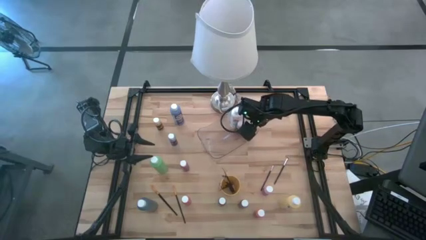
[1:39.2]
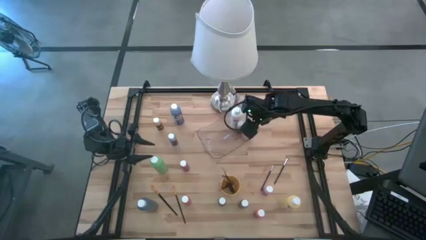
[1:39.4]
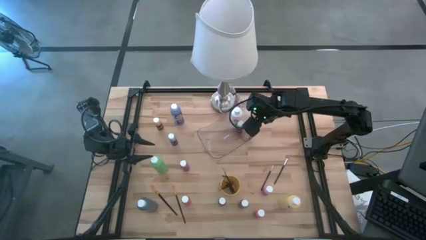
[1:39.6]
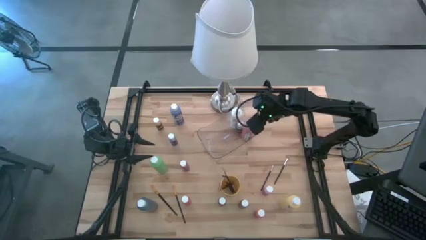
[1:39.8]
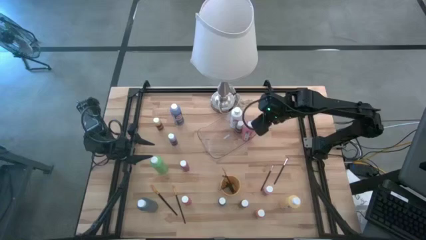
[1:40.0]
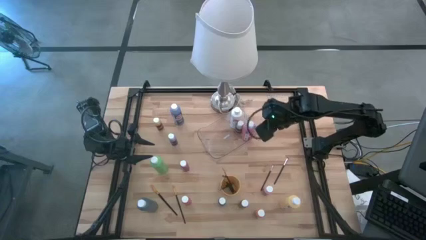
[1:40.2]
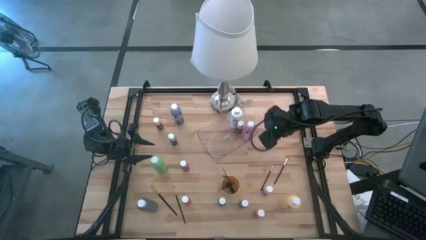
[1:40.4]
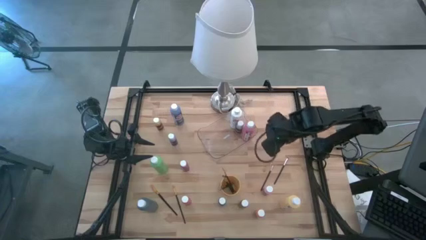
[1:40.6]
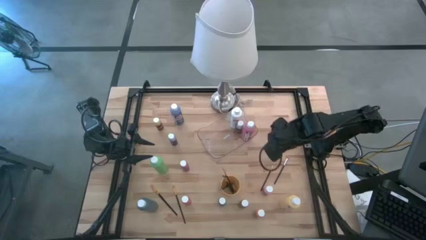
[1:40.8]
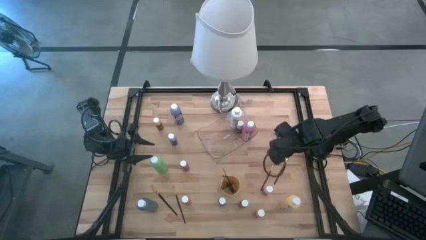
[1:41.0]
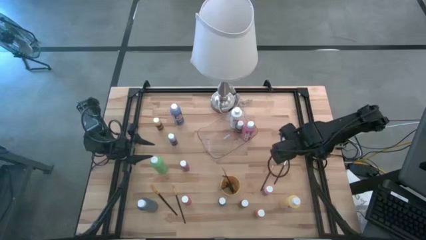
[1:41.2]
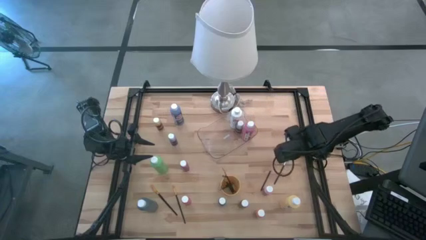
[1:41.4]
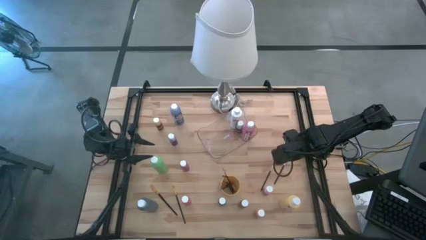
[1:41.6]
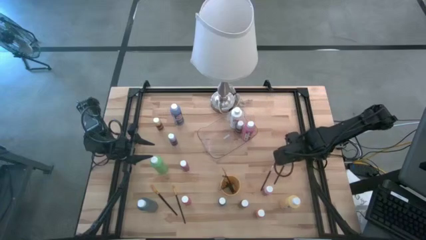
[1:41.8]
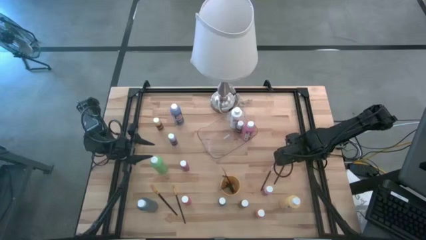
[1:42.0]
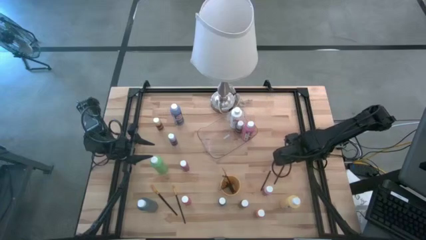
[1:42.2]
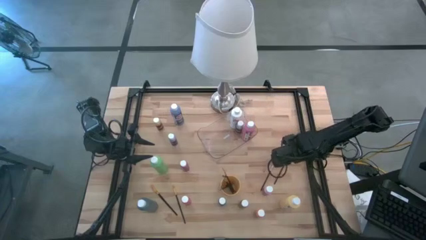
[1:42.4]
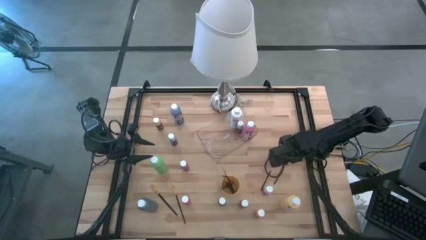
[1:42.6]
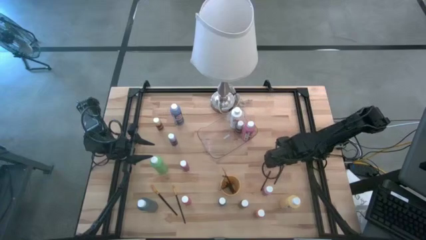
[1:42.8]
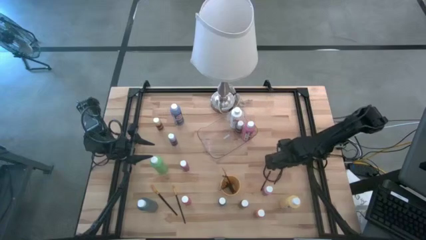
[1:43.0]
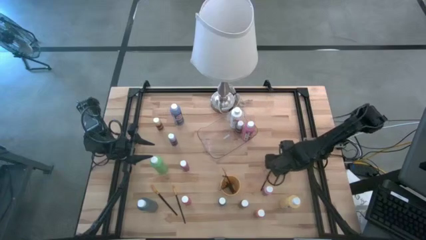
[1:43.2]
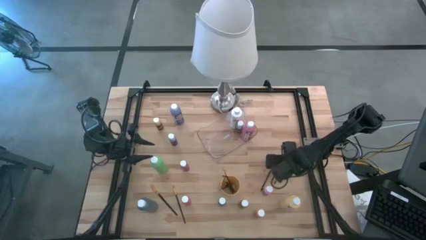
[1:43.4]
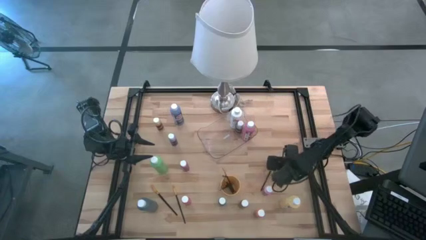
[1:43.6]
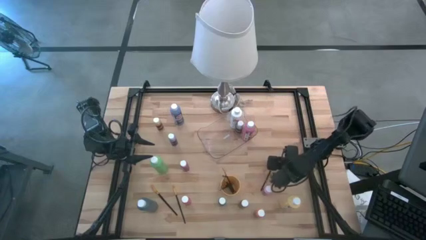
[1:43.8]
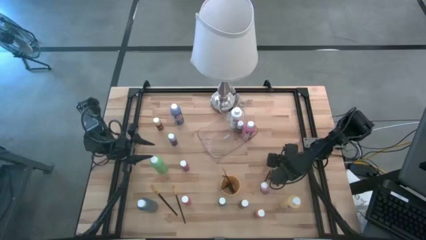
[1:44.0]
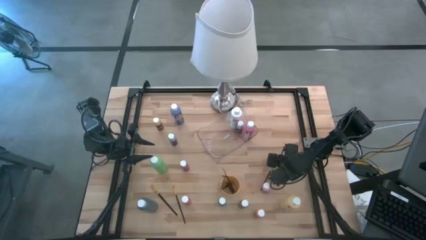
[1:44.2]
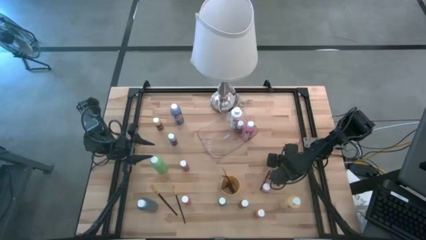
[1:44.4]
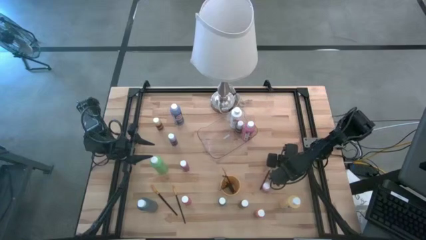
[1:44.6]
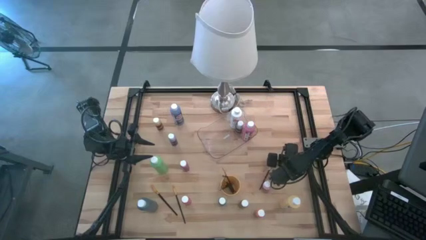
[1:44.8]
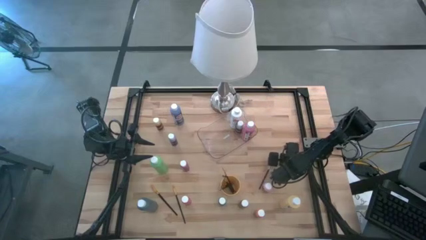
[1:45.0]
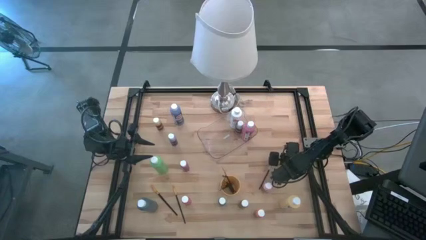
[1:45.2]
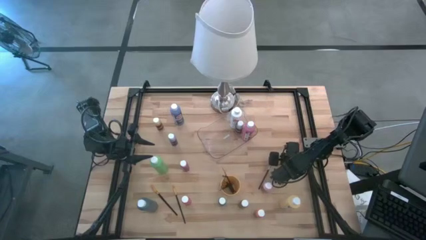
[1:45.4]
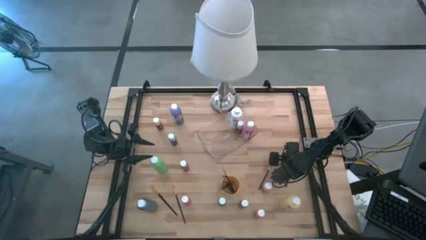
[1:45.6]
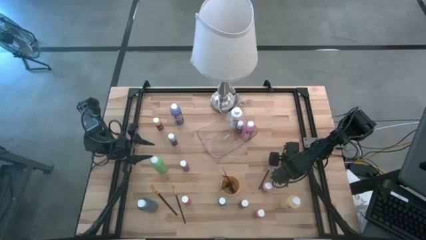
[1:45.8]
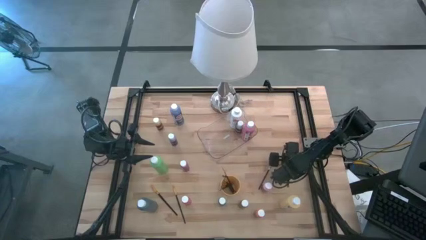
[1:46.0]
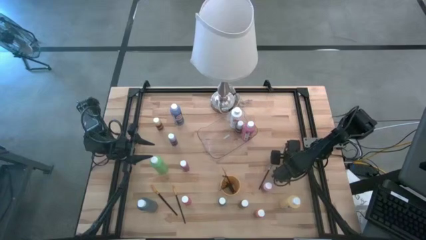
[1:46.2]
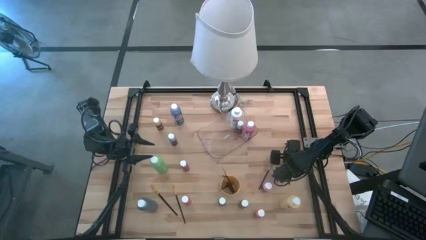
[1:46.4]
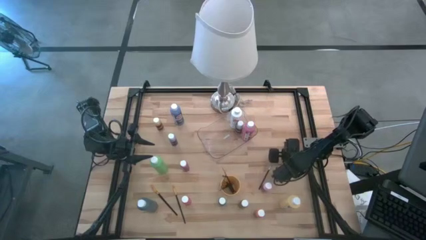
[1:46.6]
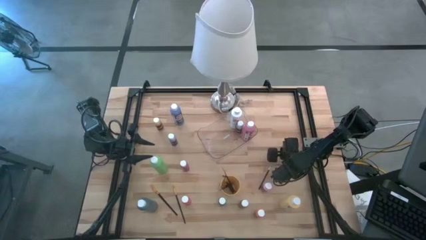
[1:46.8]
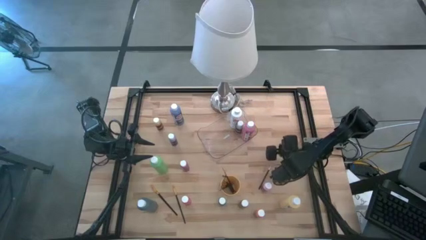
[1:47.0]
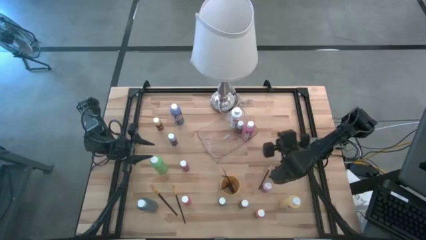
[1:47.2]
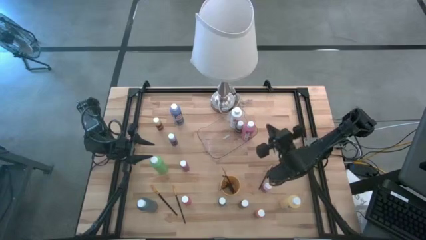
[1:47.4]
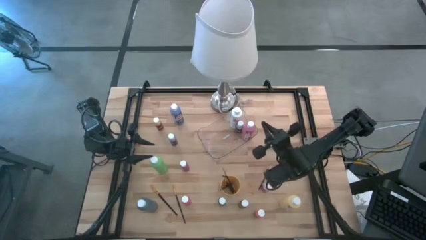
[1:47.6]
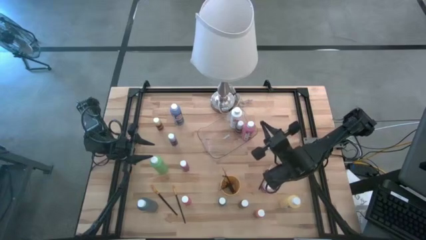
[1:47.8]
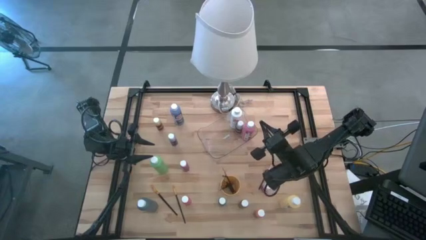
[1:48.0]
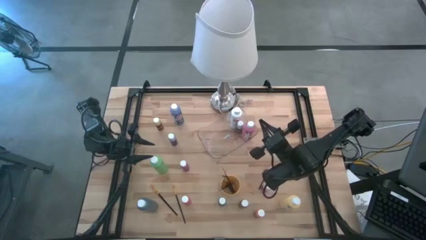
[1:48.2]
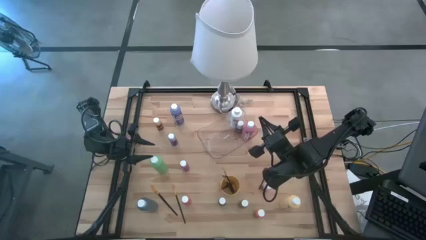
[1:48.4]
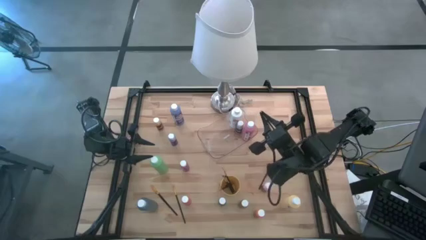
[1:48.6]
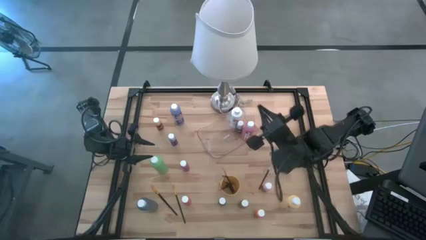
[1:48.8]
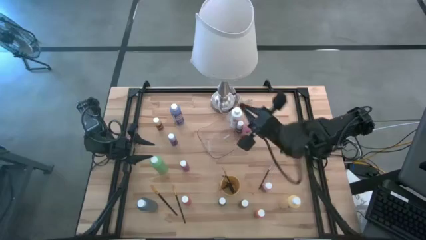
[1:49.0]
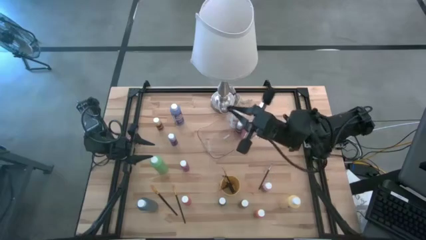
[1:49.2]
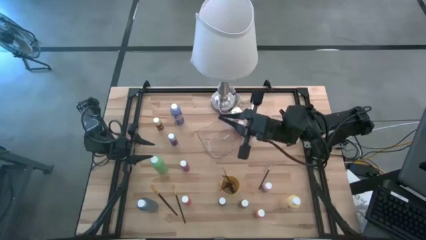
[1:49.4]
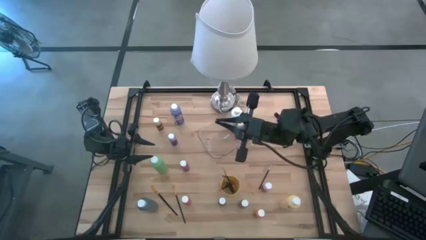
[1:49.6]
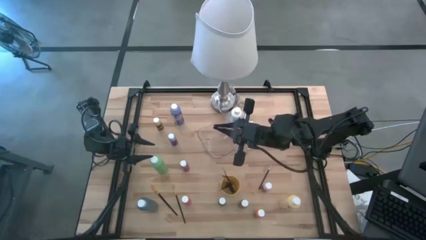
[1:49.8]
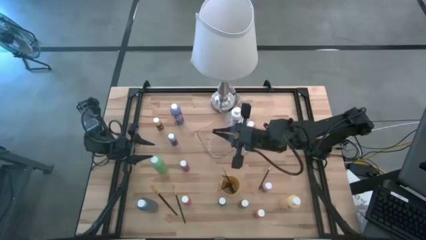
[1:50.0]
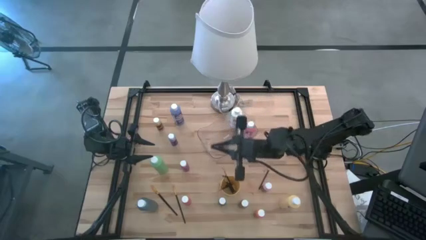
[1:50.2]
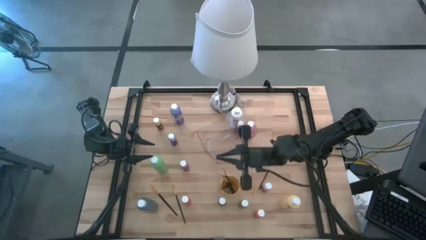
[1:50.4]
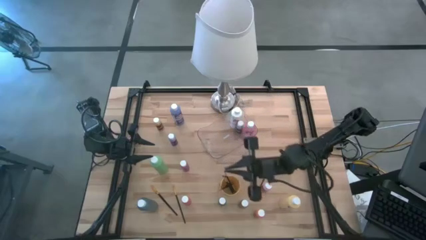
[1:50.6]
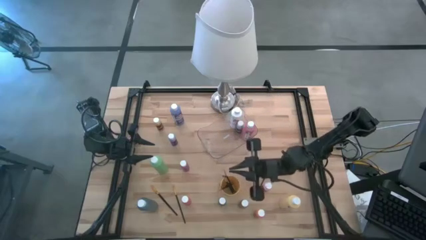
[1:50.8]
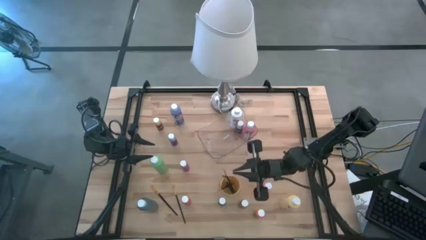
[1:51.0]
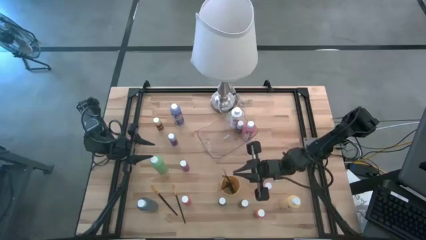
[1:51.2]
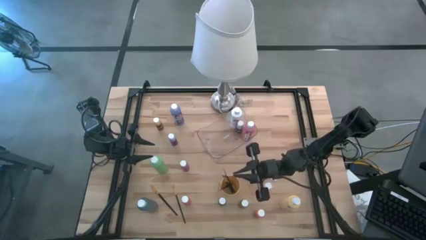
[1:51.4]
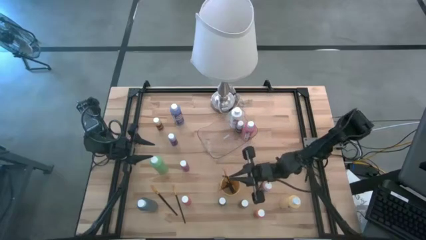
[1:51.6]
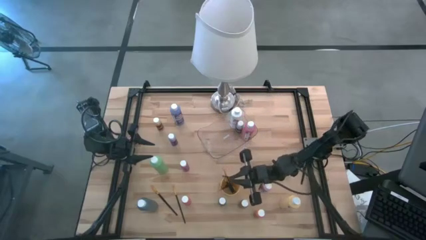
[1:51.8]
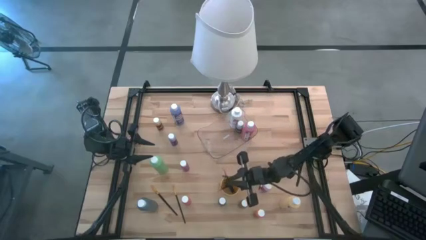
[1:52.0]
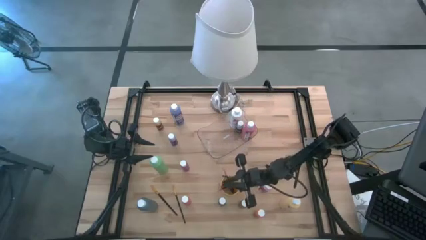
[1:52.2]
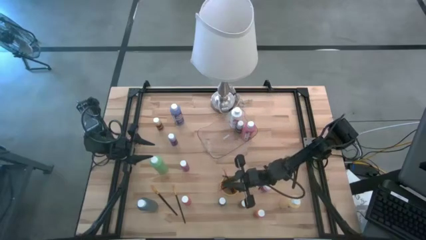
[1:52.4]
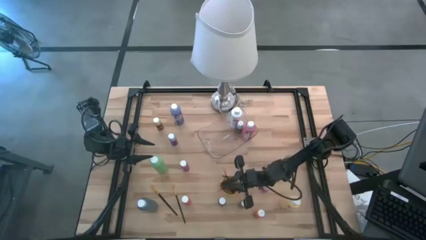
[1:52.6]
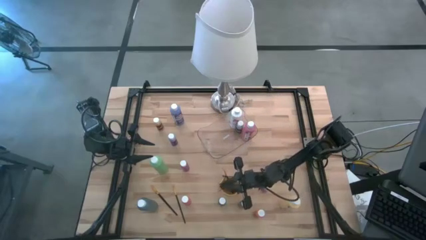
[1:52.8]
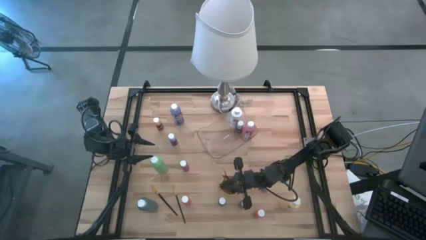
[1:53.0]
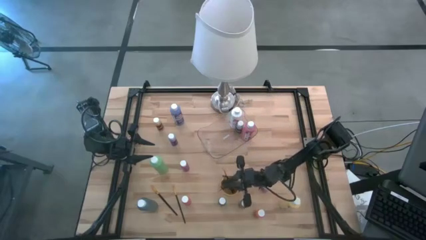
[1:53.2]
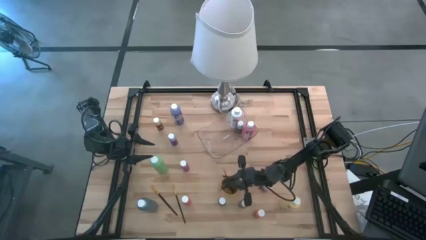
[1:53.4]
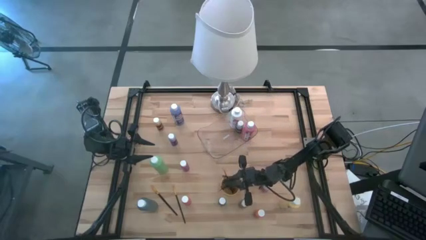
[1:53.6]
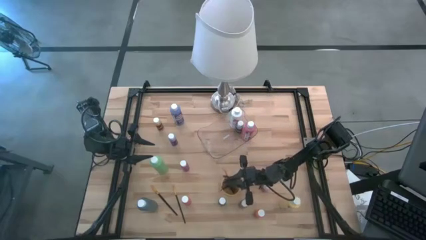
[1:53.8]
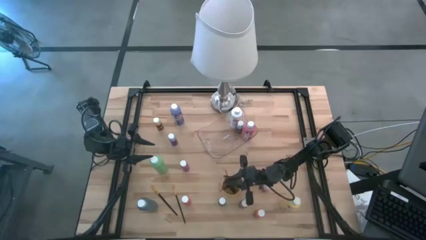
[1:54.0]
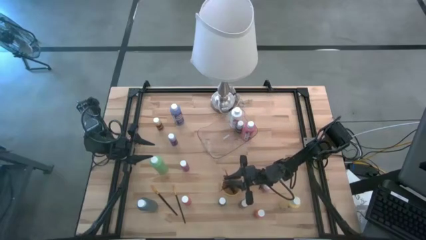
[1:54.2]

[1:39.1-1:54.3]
Task: Pick & Place Paint Supplies
Put the black paint brush into the yellow cup

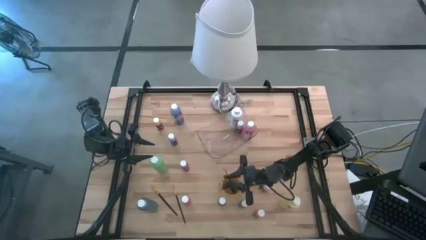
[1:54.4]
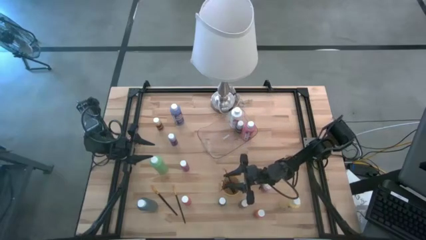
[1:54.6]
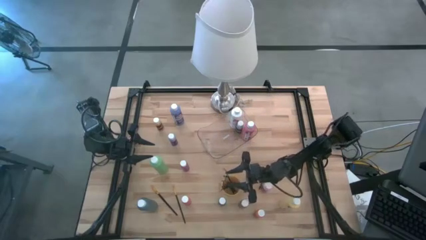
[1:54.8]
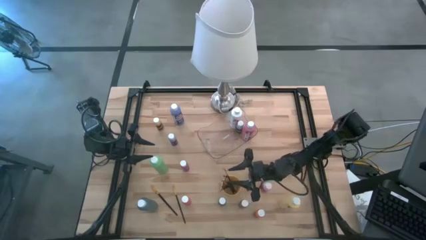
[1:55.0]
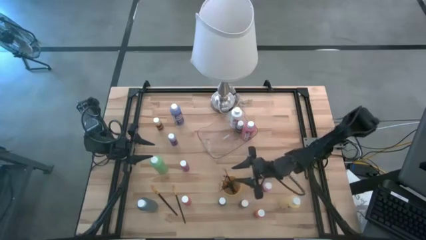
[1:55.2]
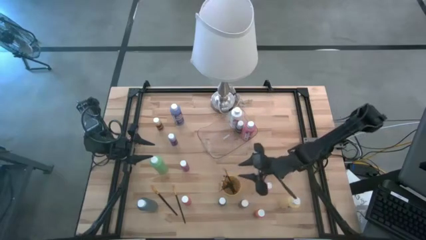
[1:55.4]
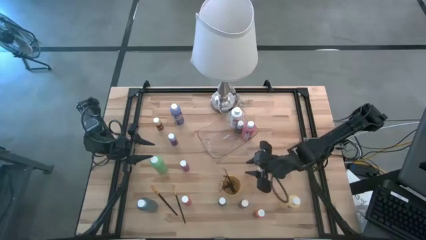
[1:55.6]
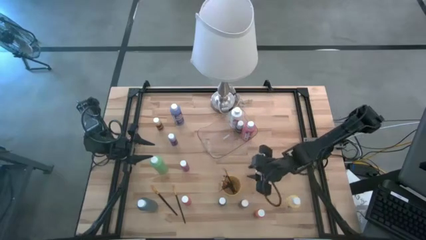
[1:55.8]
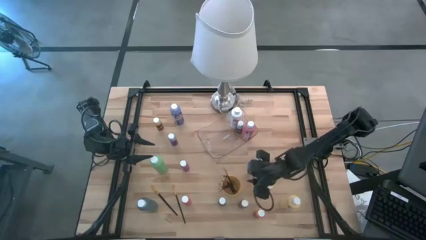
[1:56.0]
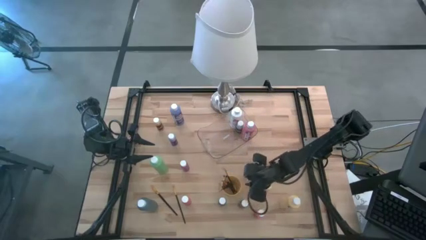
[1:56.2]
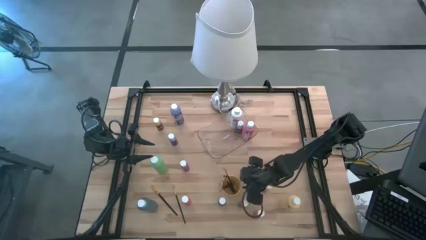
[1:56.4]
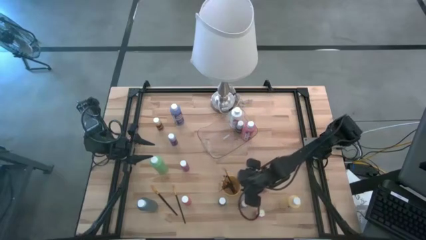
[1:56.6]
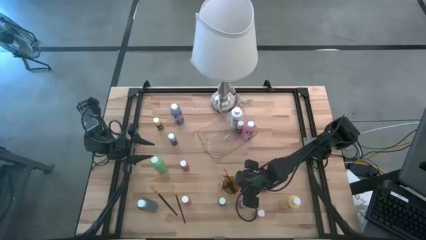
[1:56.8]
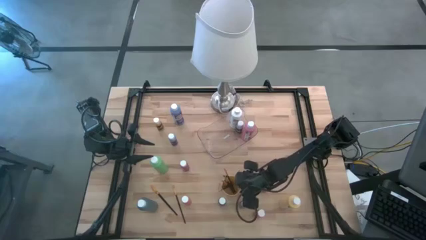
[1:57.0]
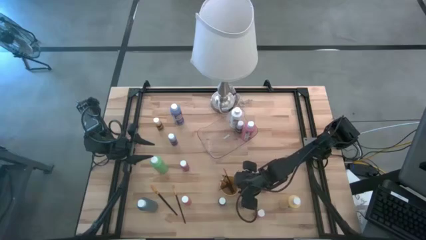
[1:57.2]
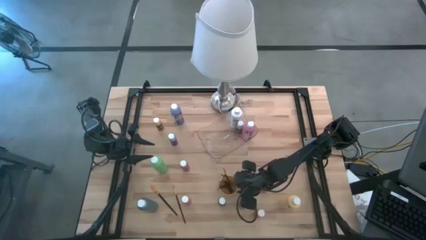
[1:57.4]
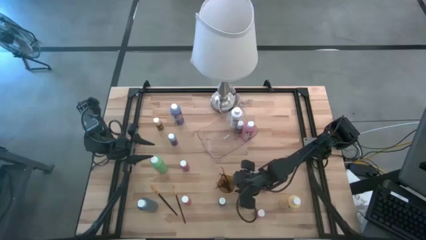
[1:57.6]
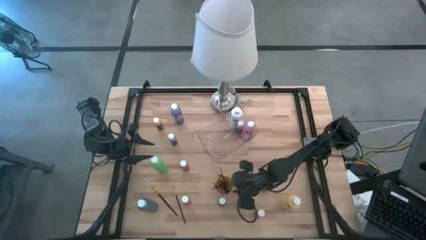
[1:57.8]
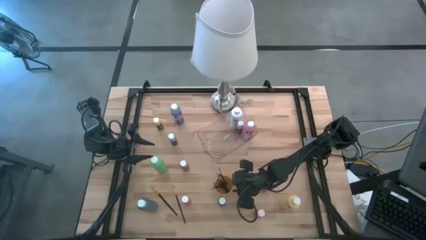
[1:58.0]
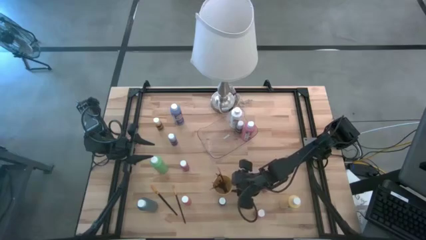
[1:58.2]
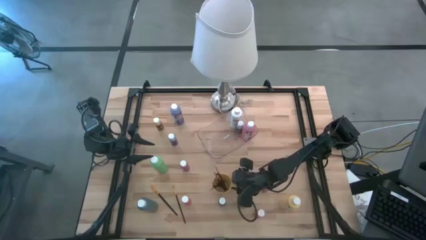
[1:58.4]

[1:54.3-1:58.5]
Adjust the yellow cup
